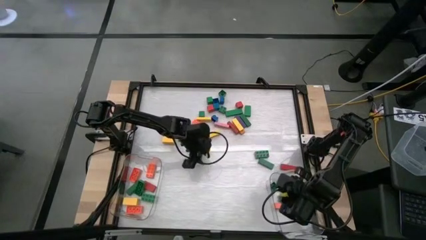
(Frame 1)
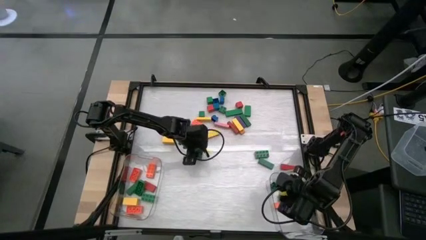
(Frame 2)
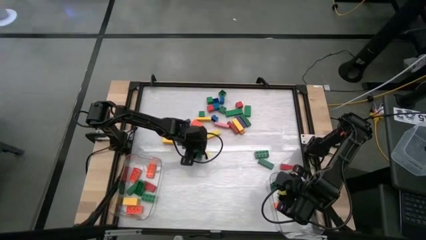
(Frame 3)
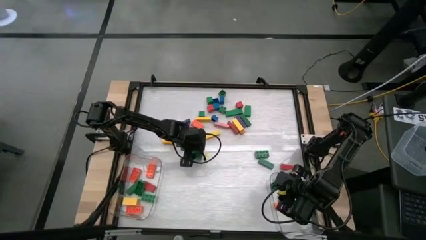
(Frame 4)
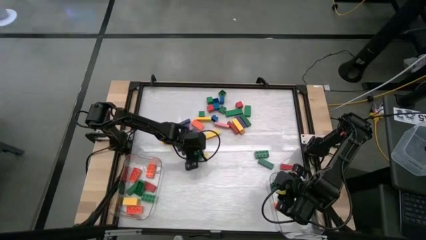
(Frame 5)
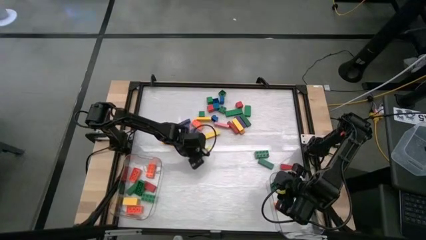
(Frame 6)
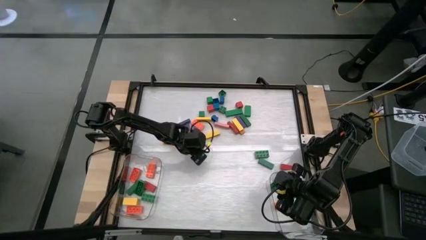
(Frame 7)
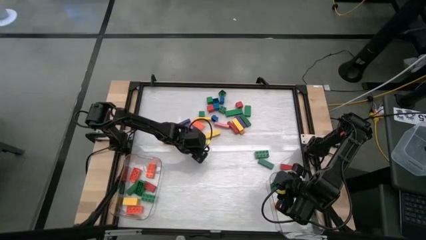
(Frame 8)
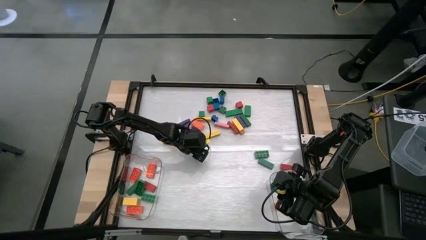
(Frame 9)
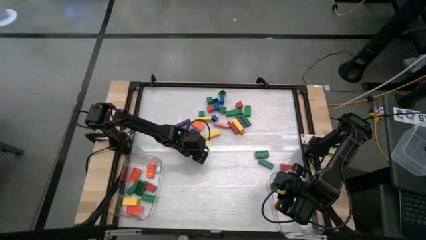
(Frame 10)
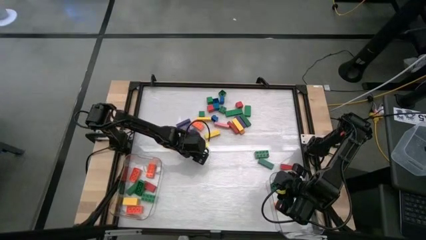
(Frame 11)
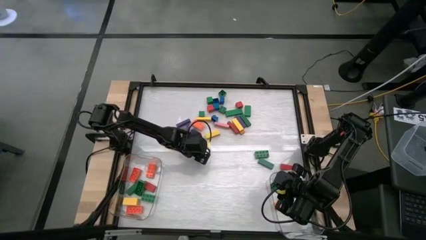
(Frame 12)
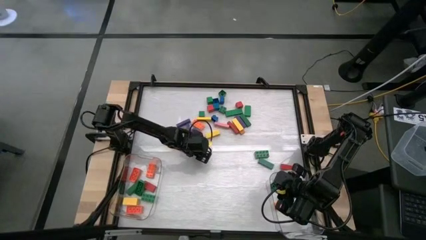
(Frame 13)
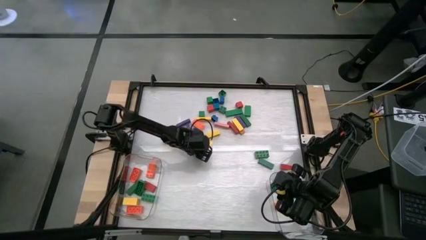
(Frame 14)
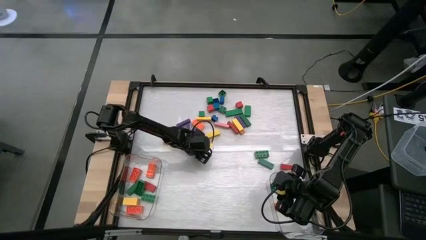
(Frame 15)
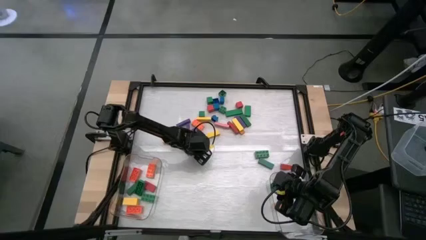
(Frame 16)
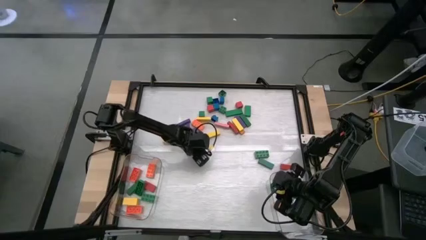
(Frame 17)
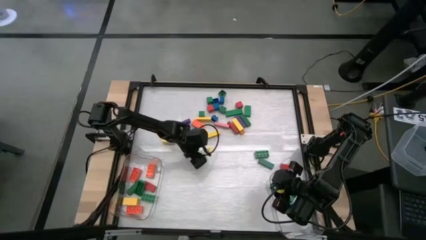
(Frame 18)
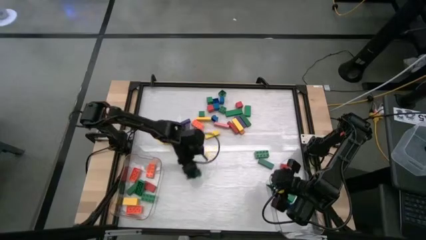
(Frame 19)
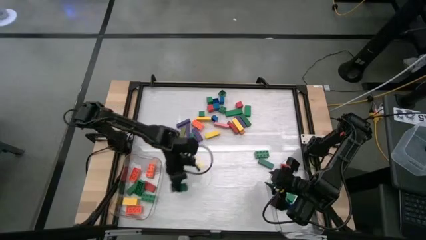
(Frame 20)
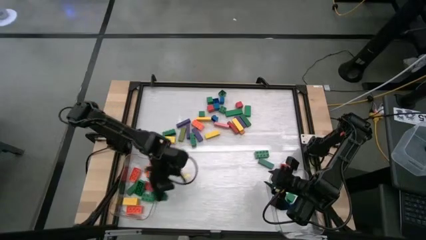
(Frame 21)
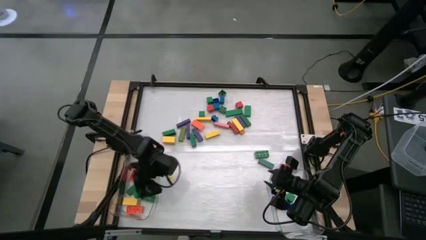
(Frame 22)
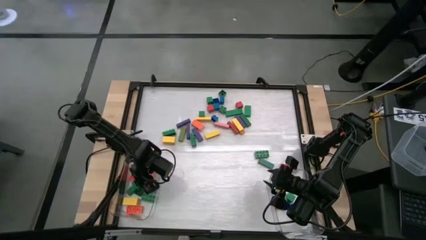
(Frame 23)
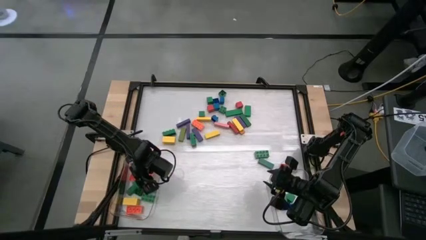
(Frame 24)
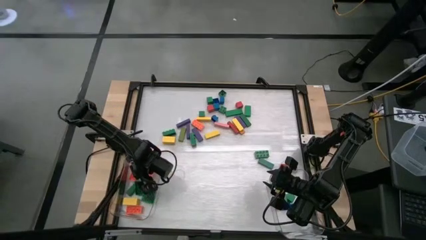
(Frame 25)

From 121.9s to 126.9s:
Task: Sort blocks by size
Put the large green game piece into the left transparent bin

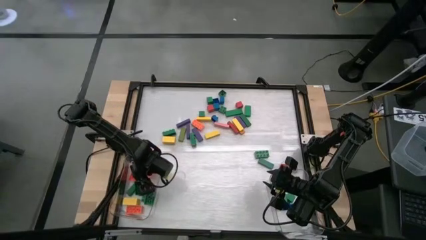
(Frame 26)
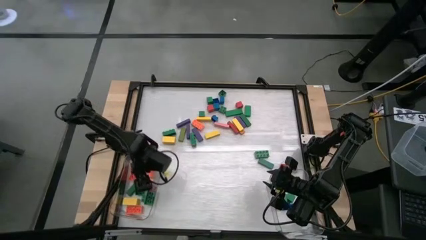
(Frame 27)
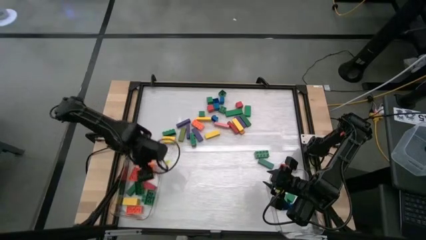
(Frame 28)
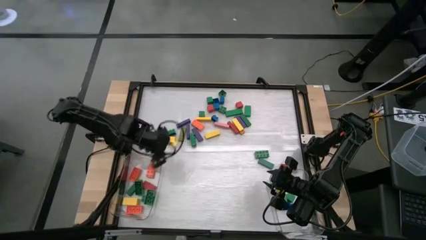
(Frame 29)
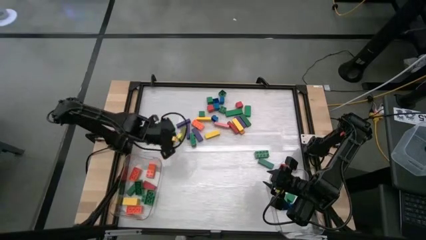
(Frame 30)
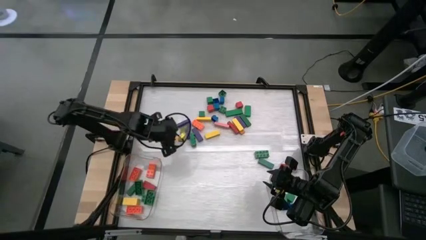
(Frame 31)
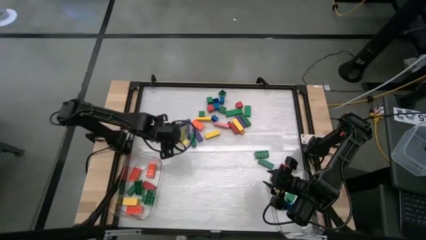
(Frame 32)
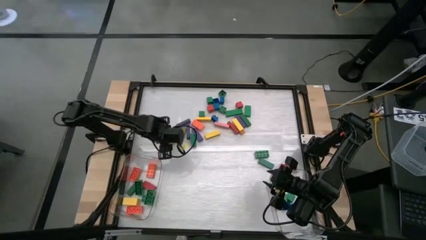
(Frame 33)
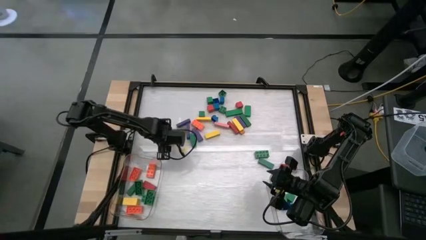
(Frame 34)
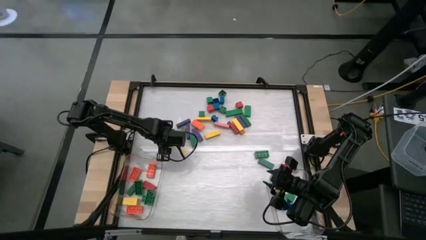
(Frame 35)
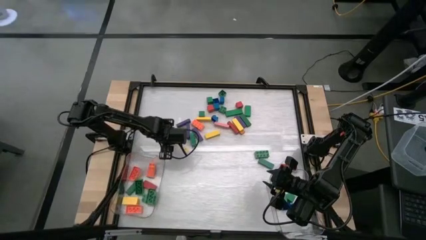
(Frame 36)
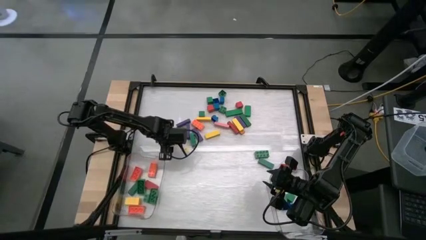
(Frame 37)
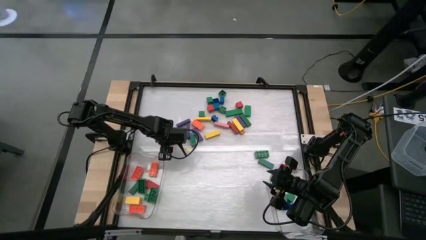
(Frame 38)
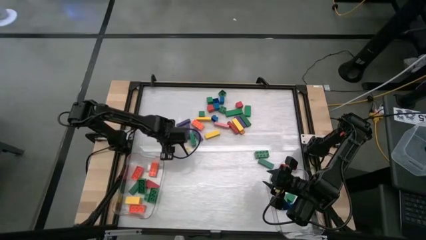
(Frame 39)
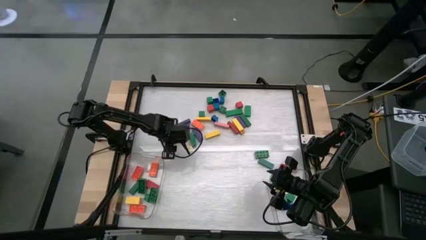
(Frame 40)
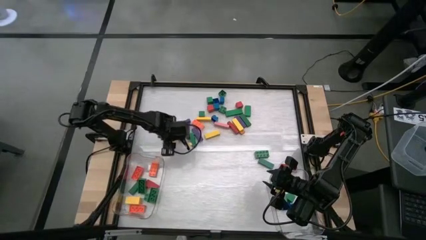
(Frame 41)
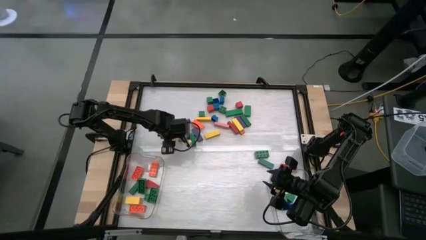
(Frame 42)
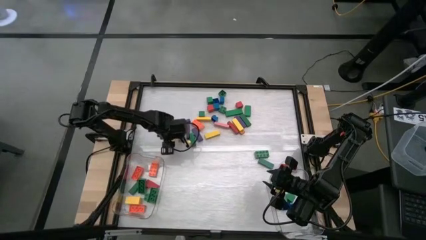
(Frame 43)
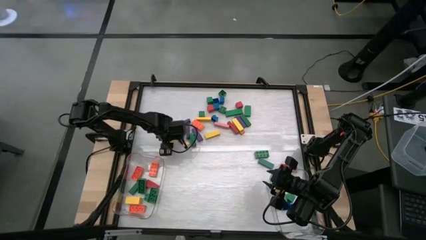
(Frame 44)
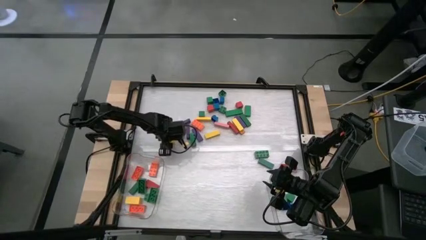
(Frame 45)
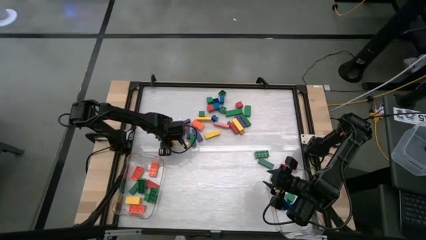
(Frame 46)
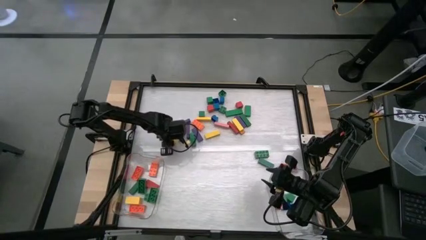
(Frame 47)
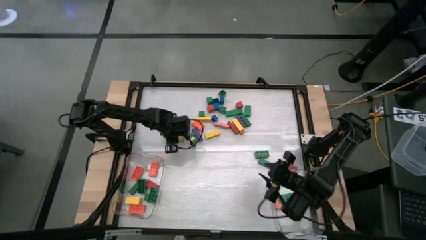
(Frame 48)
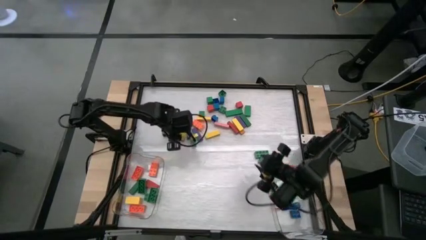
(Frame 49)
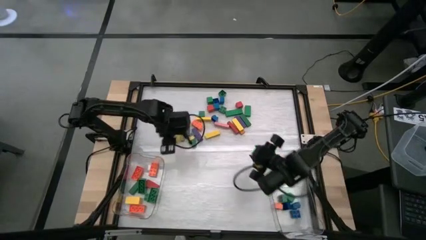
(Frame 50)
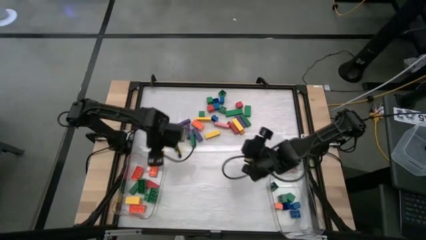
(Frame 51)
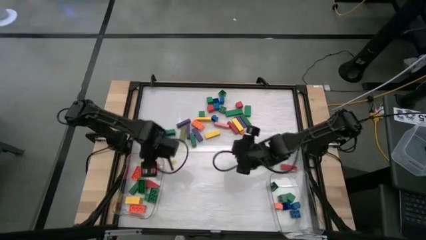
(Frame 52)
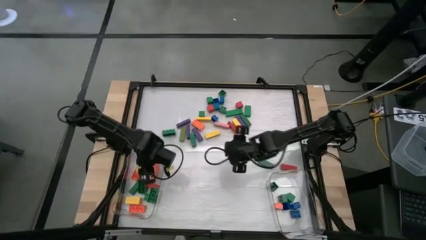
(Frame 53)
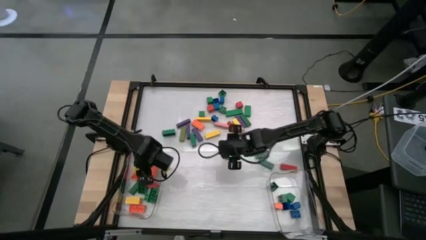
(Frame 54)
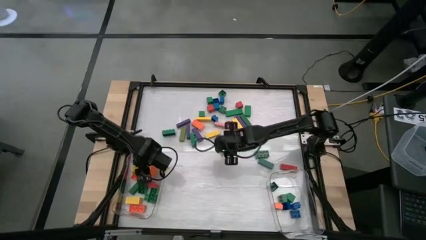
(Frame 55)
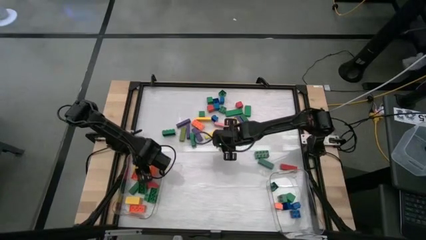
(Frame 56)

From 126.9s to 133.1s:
Put the large yellow wooden block into the left transparent bin

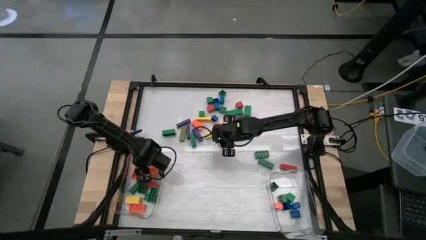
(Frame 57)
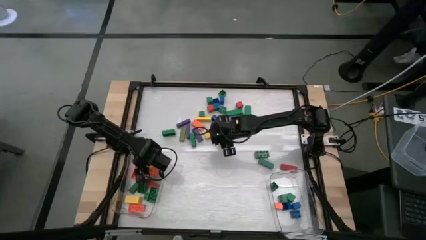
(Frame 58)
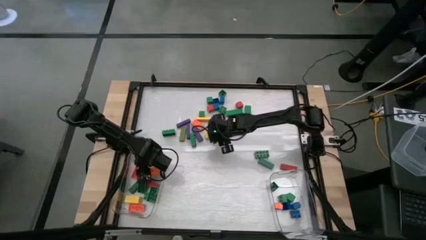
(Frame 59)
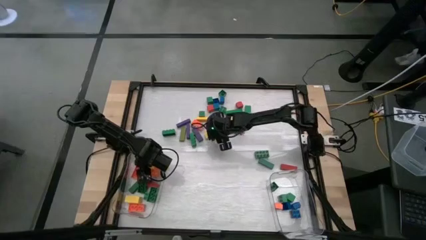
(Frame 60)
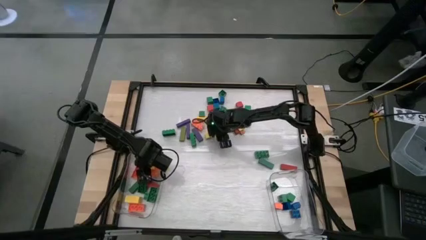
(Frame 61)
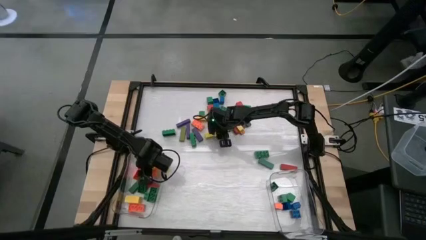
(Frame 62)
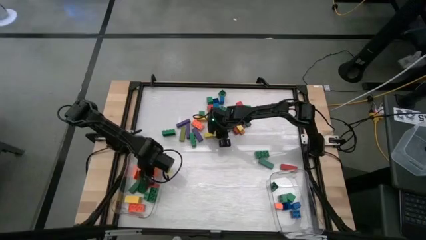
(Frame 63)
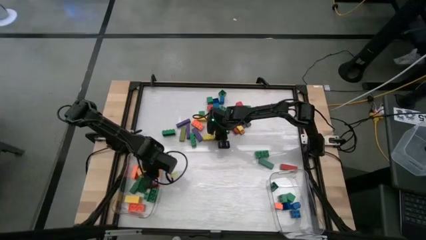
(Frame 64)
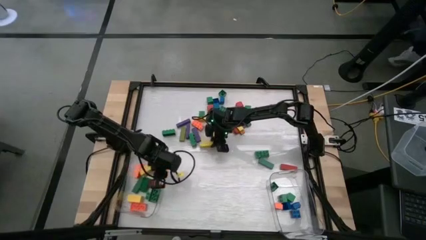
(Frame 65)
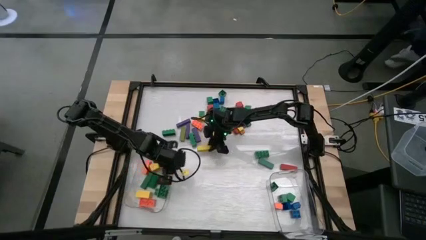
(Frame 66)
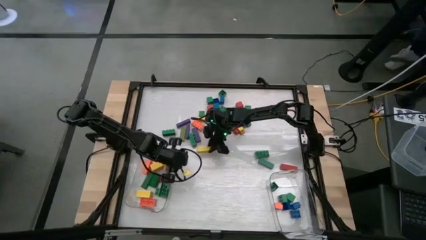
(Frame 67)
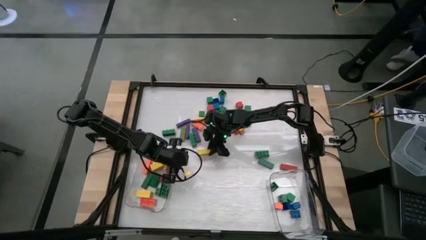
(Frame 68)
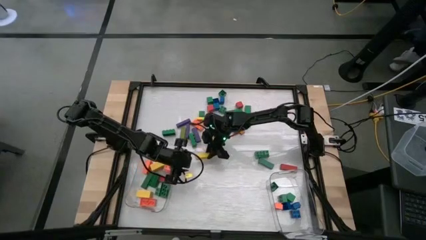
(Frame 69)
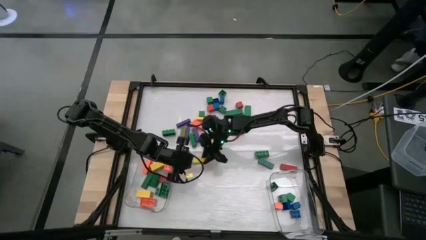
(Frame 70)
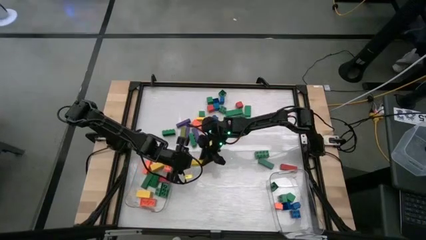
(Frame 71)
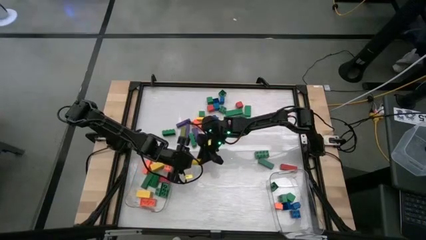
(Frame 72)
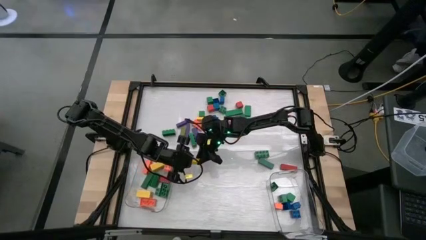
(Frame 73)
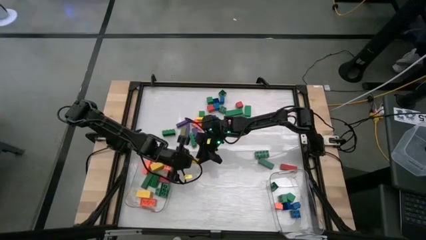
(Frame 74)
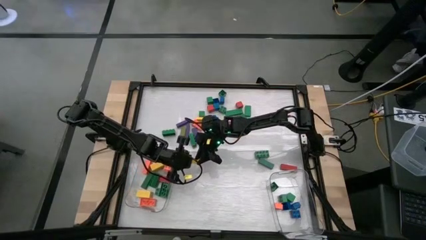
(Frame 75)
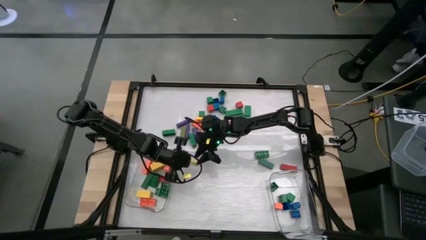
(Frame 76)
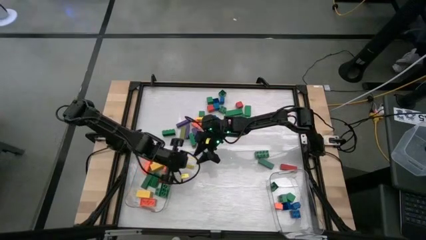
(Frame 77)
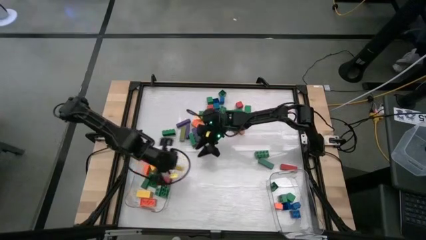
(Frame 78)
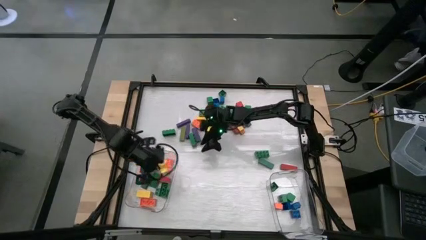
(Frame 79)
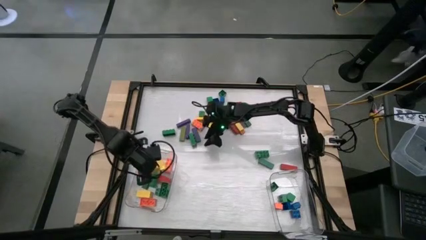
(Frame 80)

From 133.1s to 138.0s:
Put the large yellow wooden block into the left transparent bin
